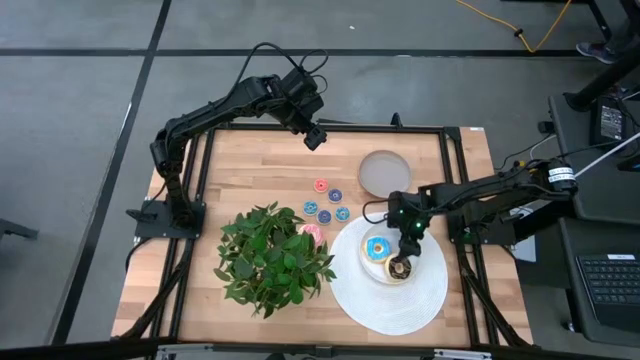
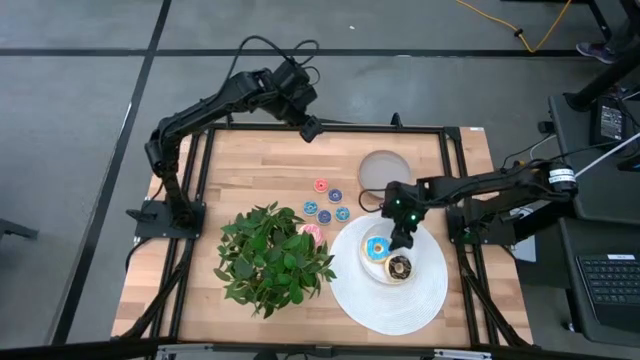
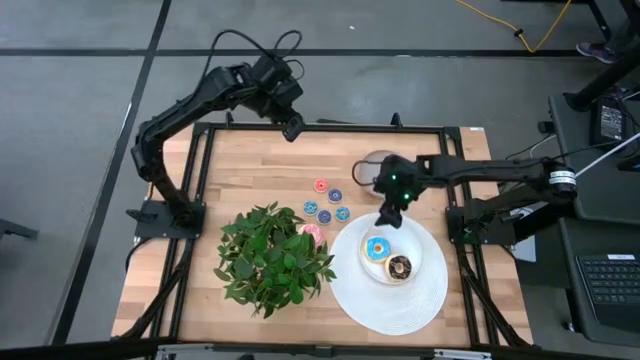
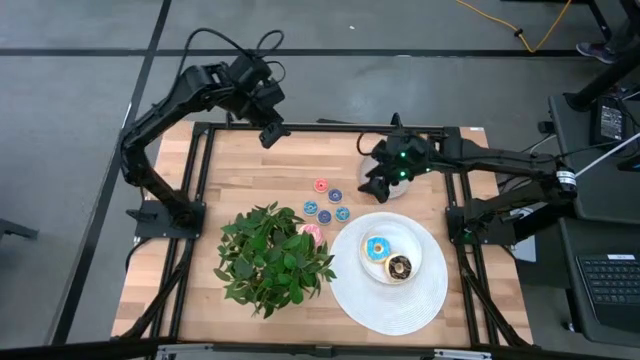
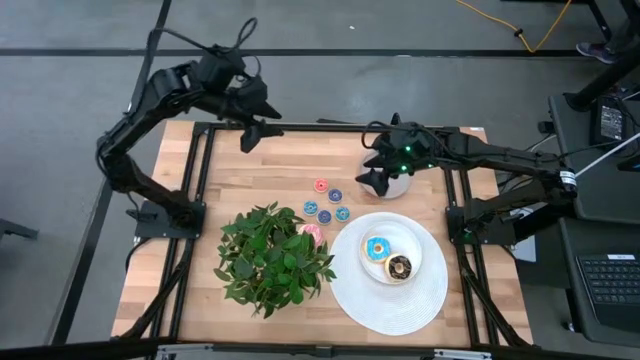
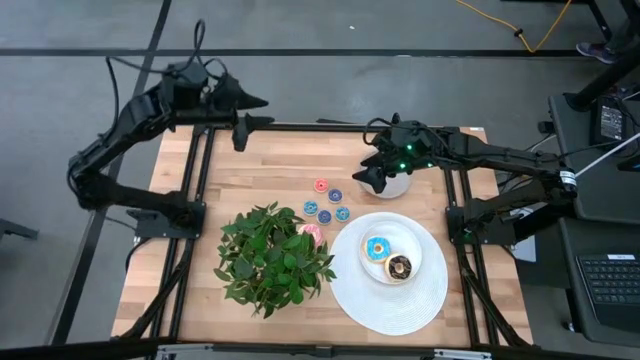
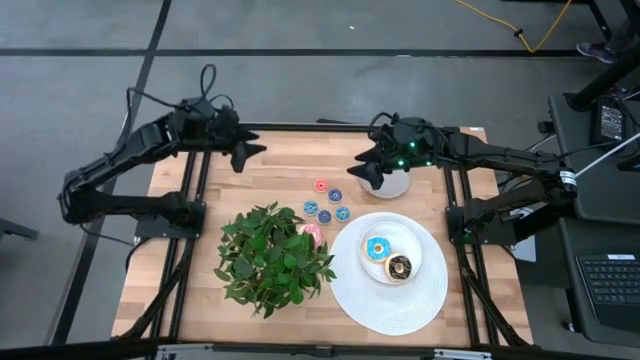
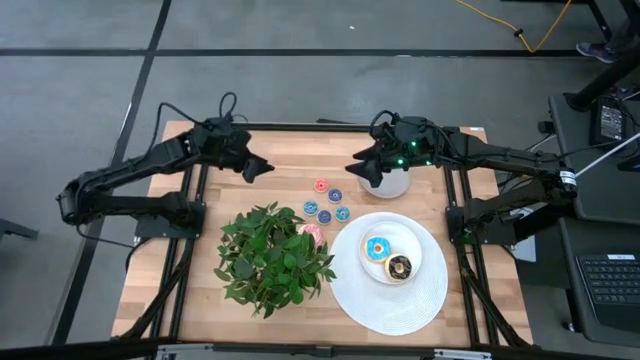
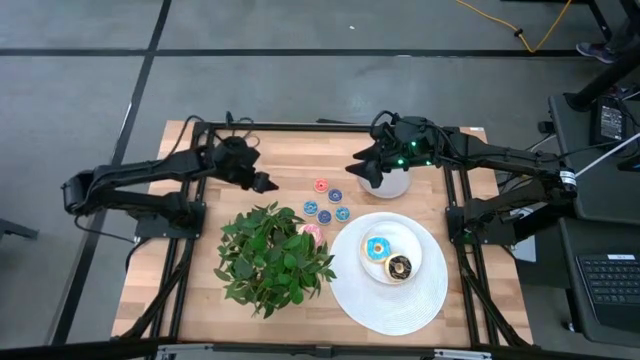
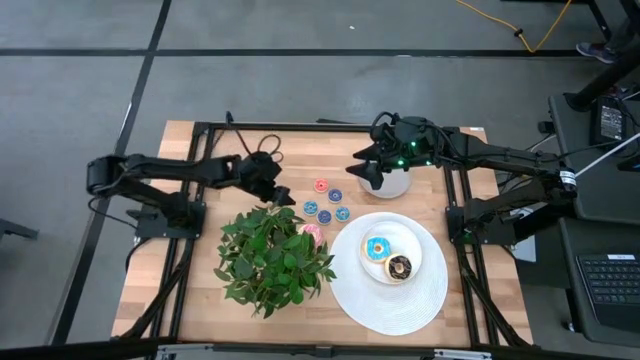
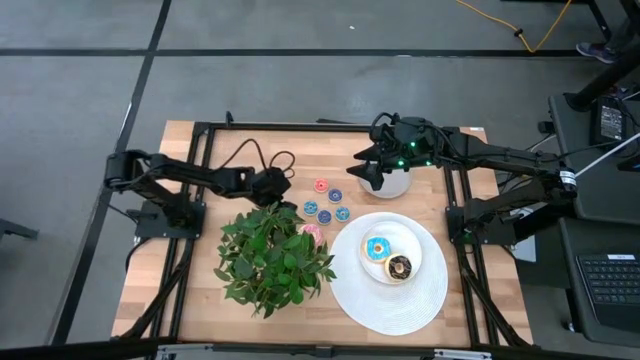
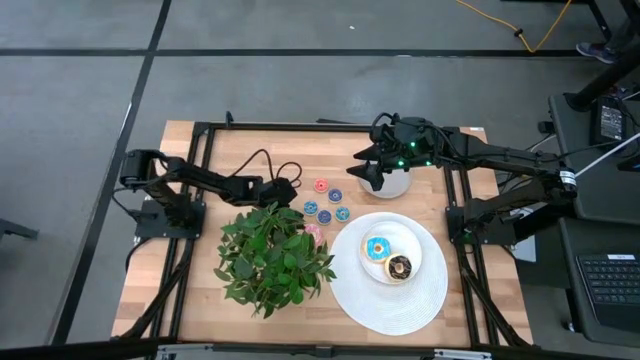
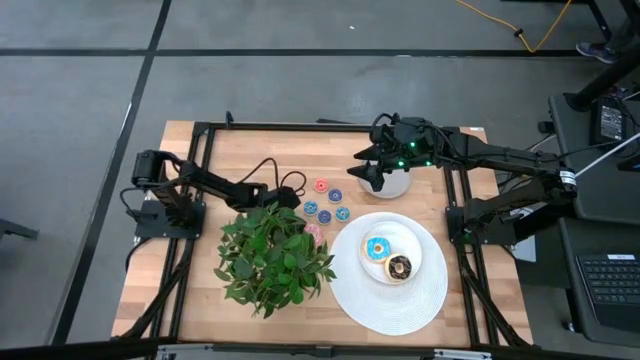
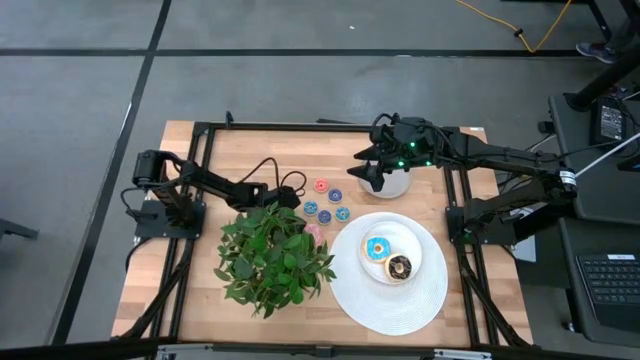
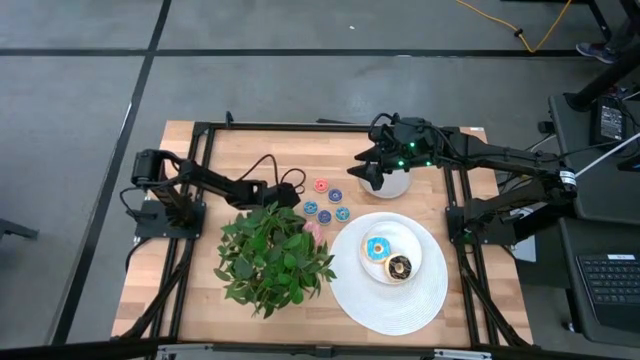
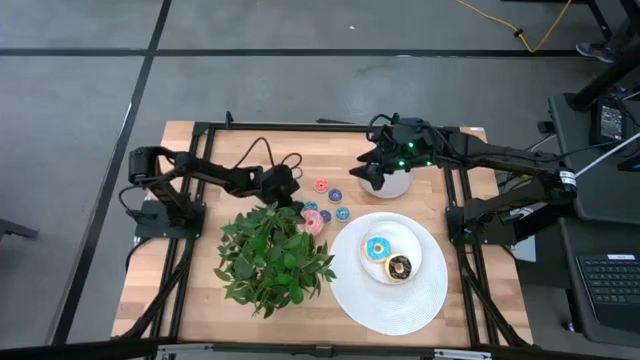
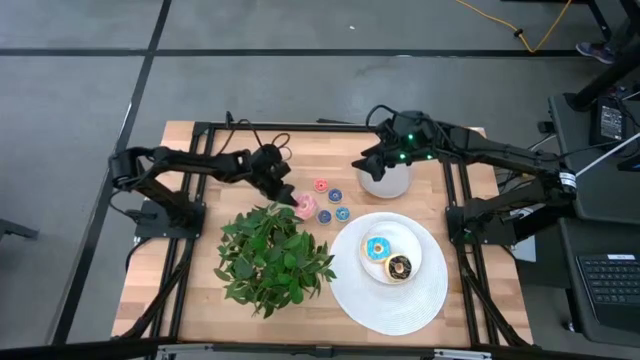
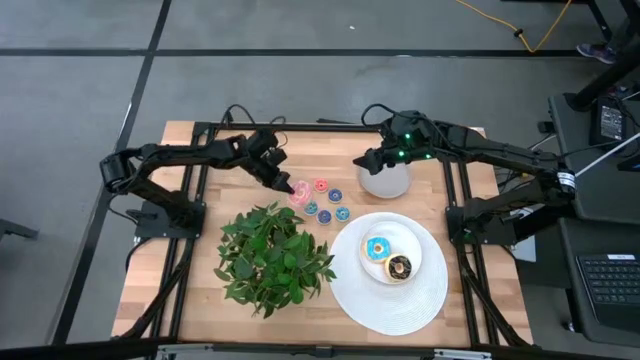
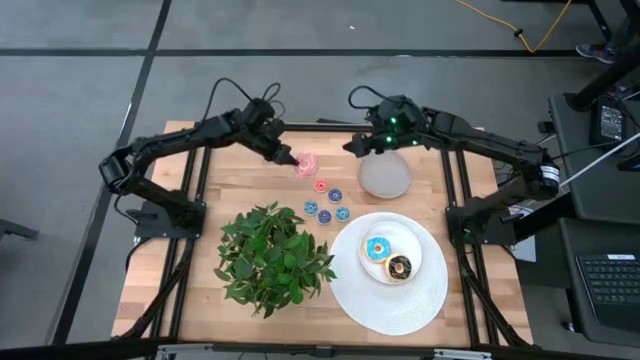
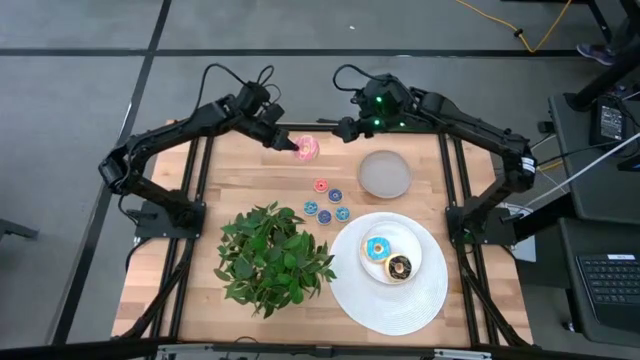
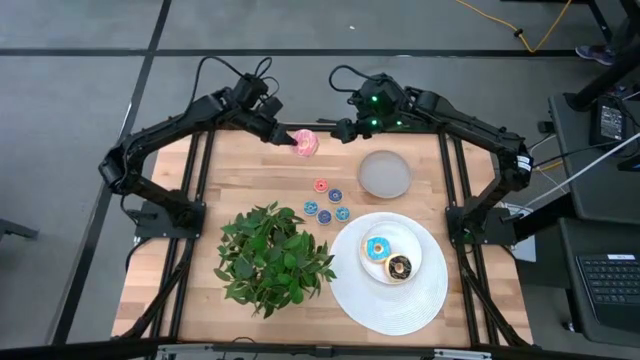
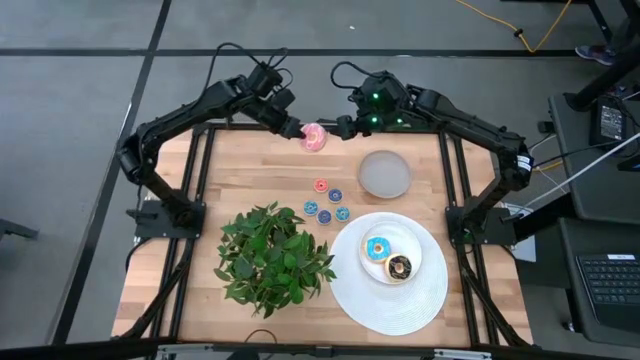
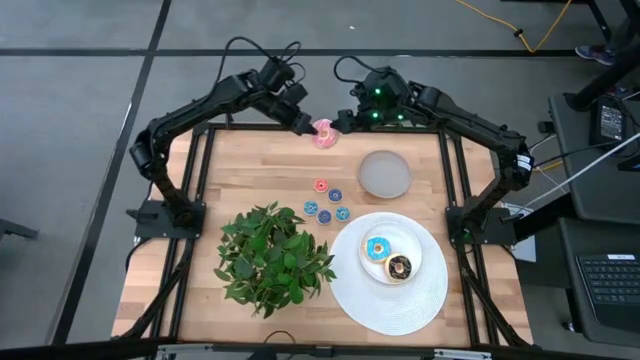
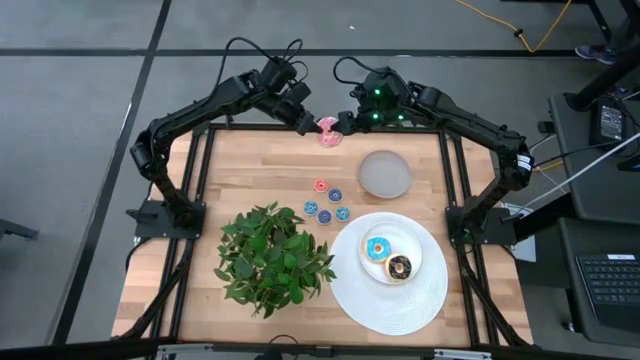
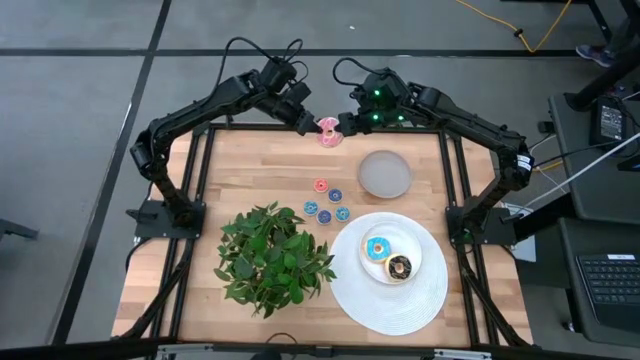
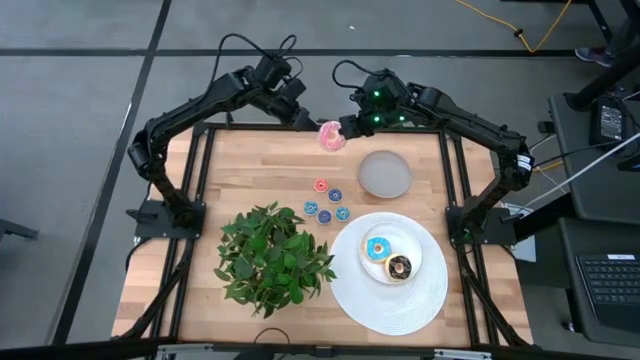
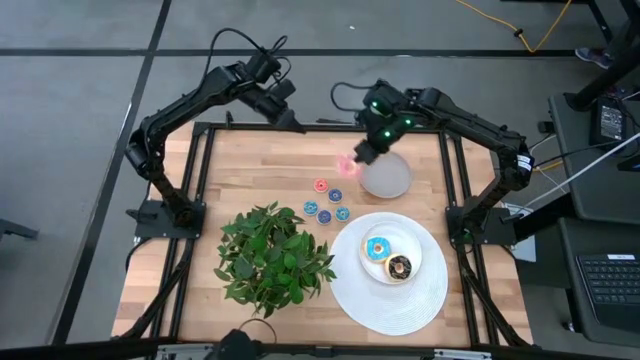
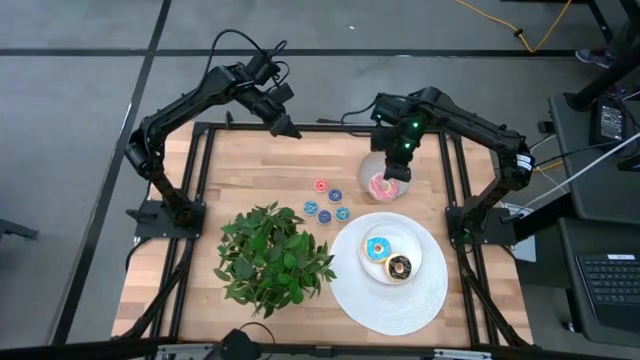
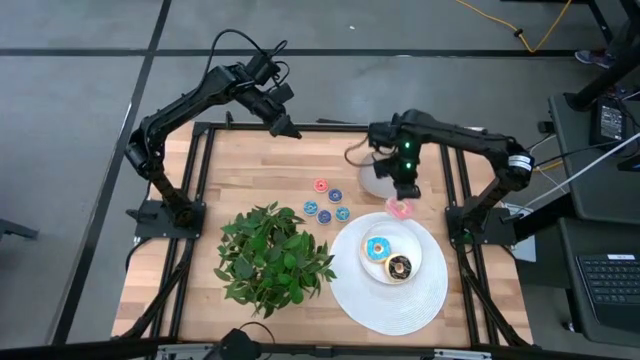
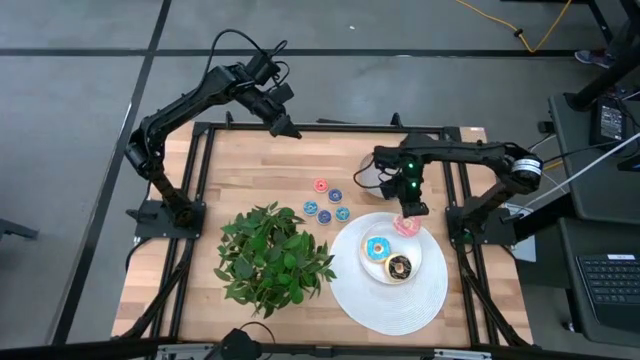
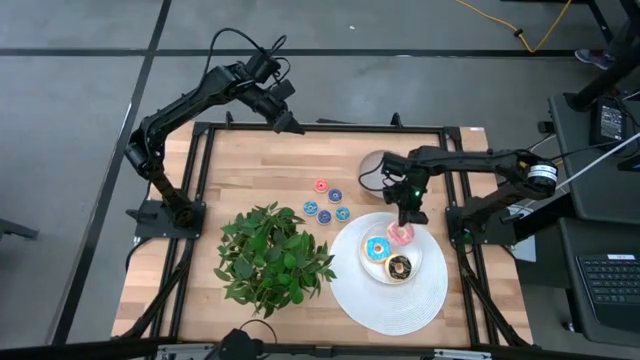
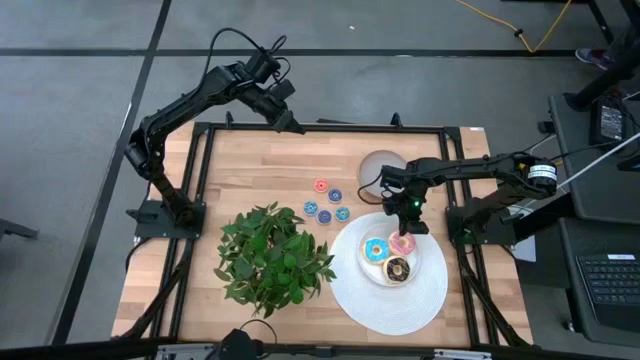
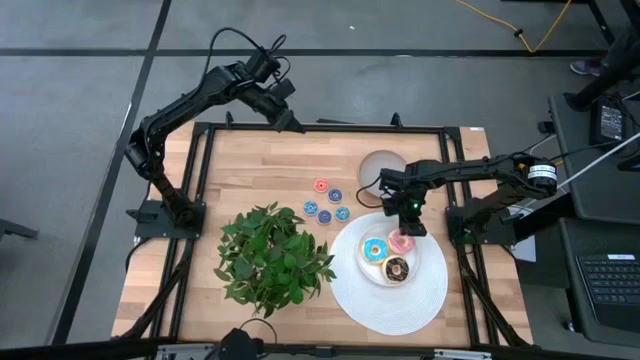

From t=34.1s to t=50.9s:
Task: Pick & Place donuts
Put the large pink donut onto the white plate

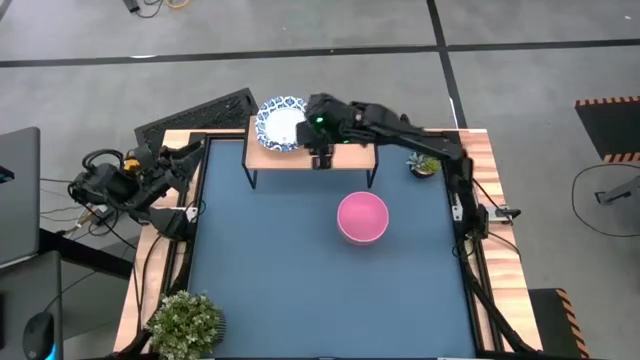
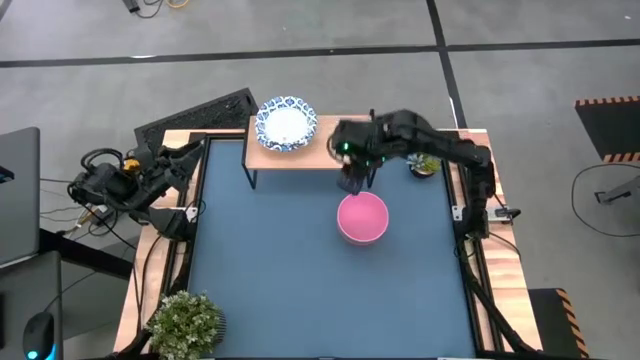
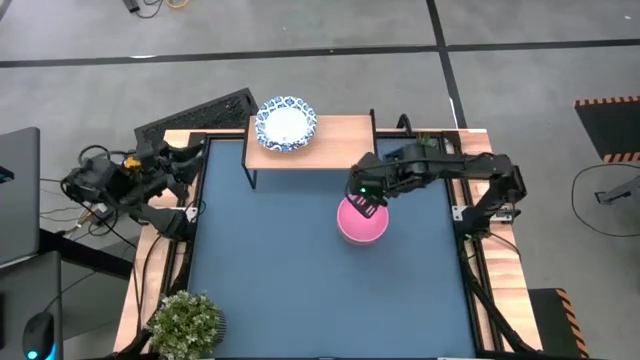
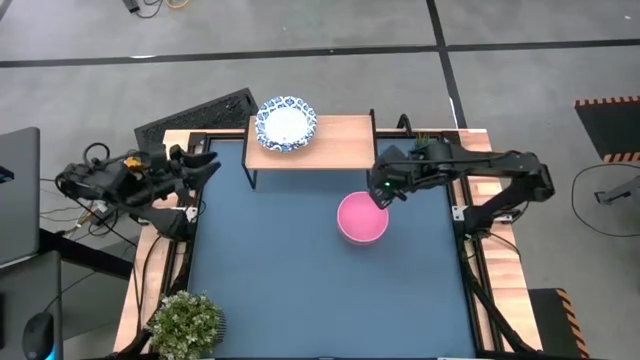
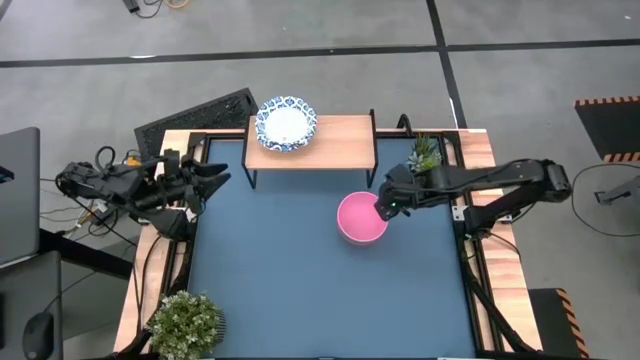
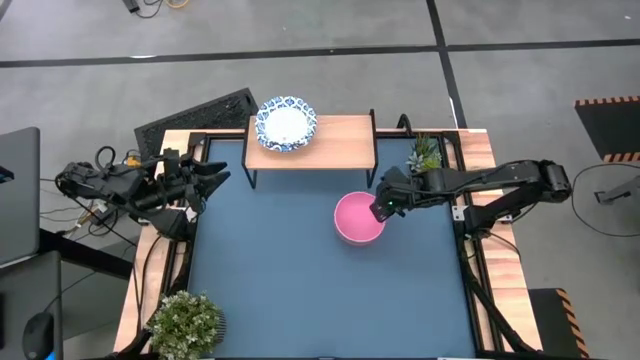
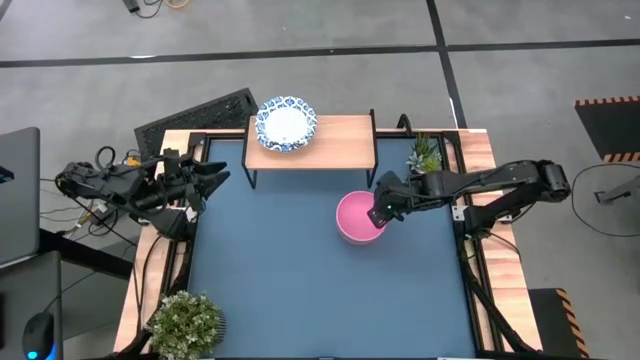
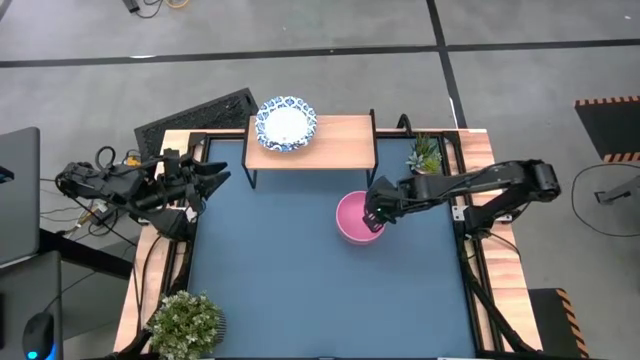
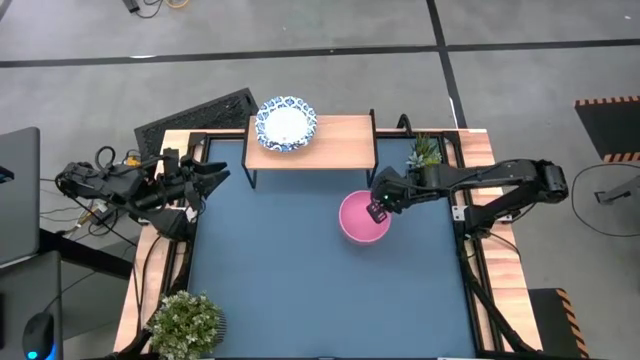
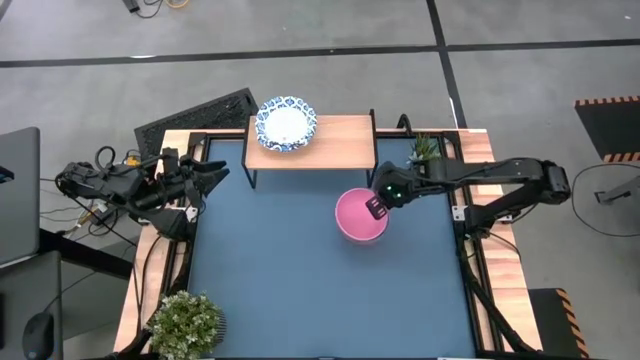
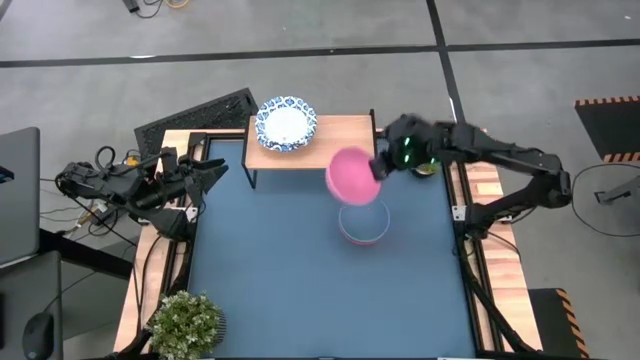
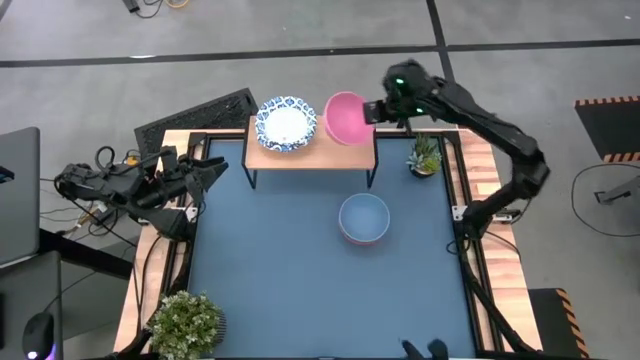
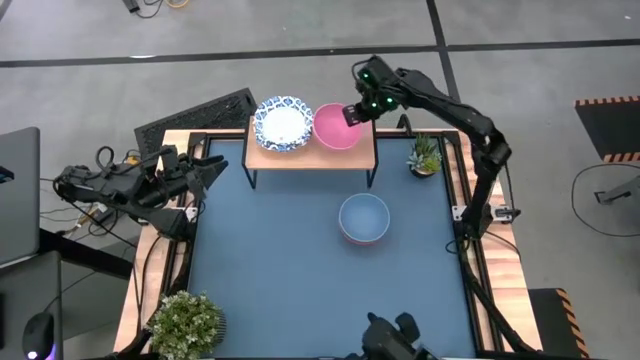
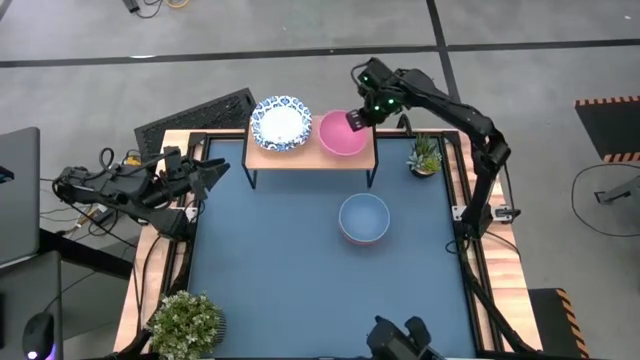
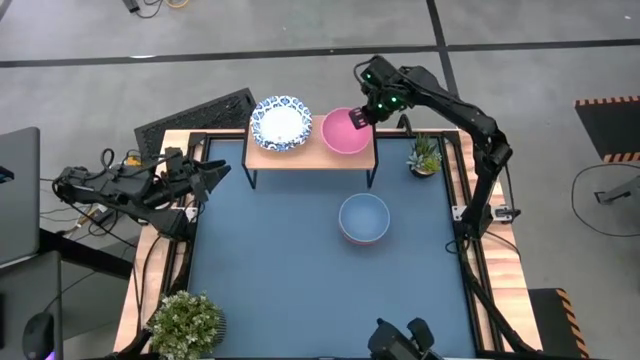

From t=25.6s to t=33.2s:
Task: Place and stack bowls onto a shelf
Put the pink bowl on the shelf
